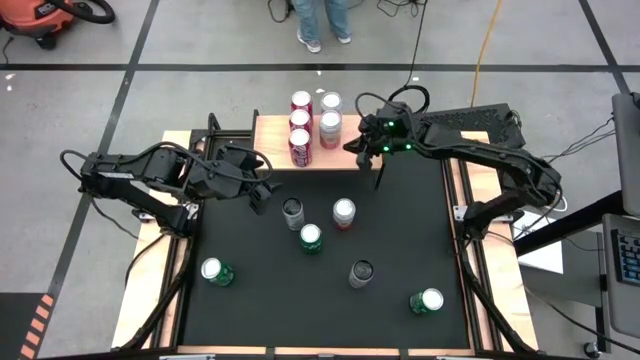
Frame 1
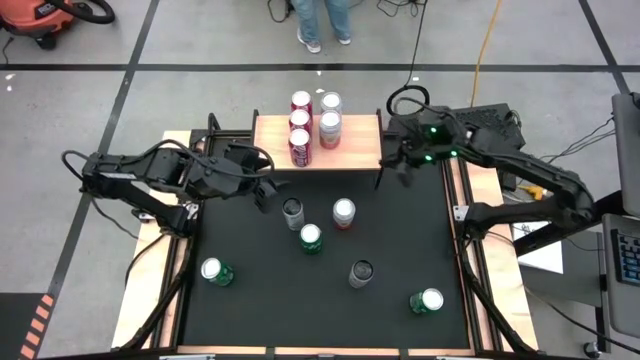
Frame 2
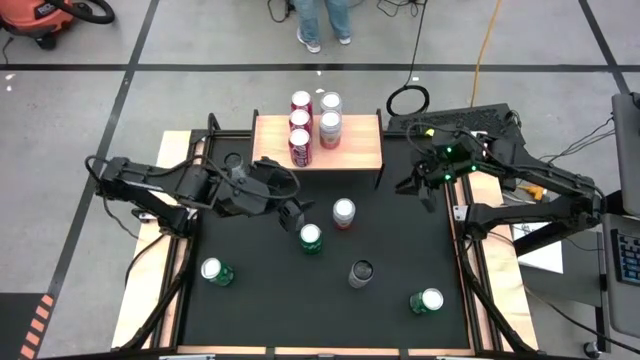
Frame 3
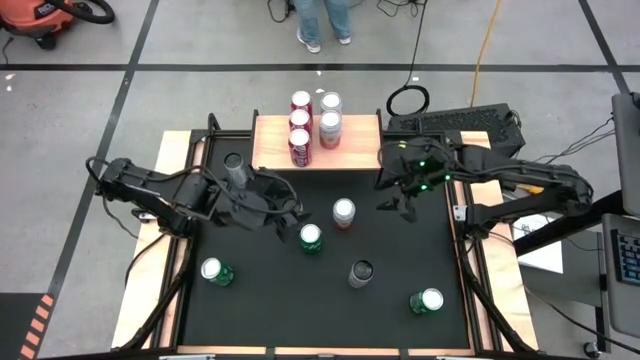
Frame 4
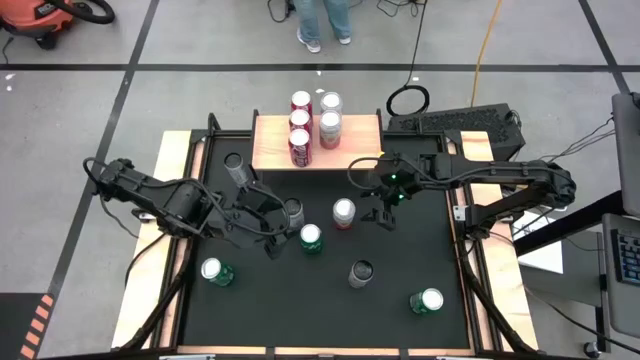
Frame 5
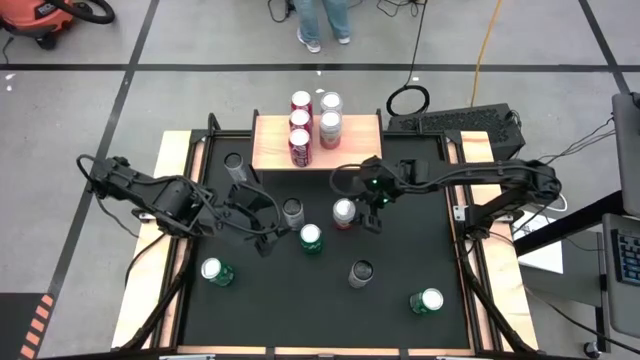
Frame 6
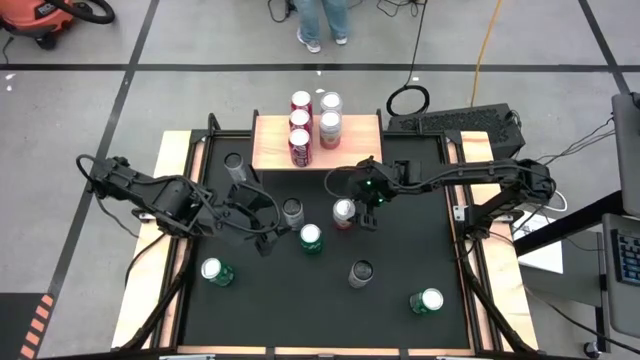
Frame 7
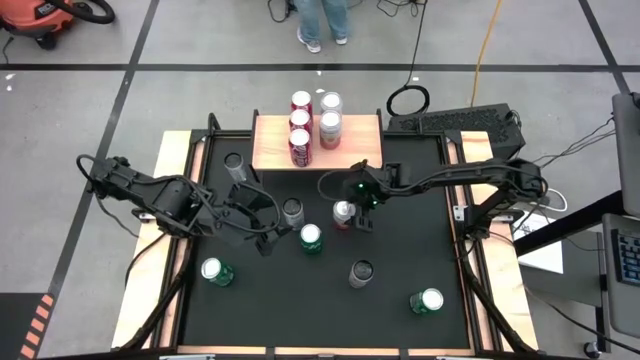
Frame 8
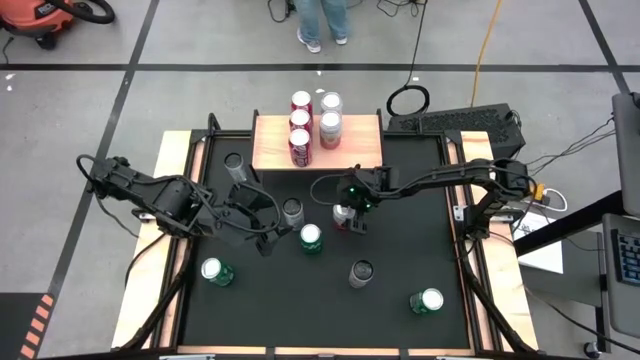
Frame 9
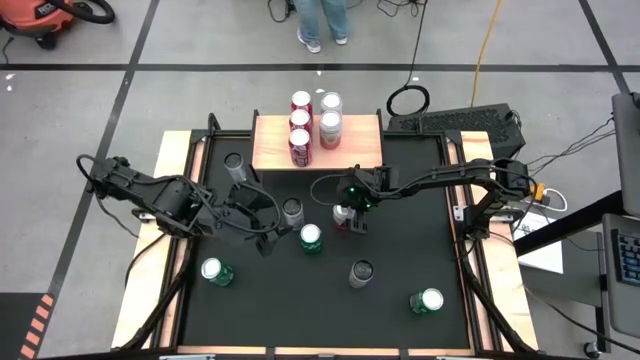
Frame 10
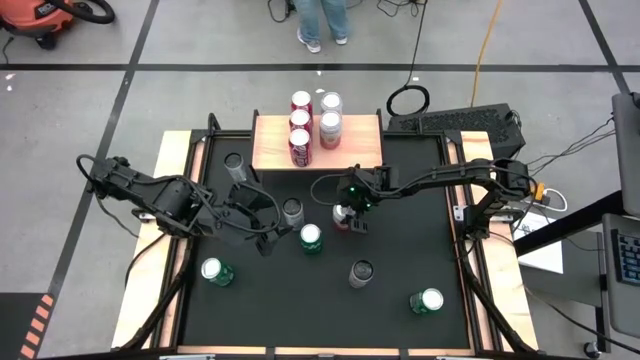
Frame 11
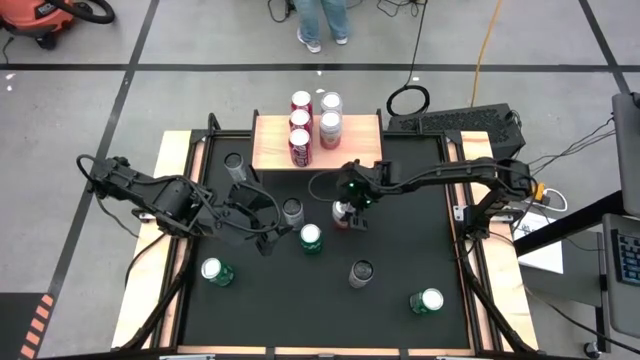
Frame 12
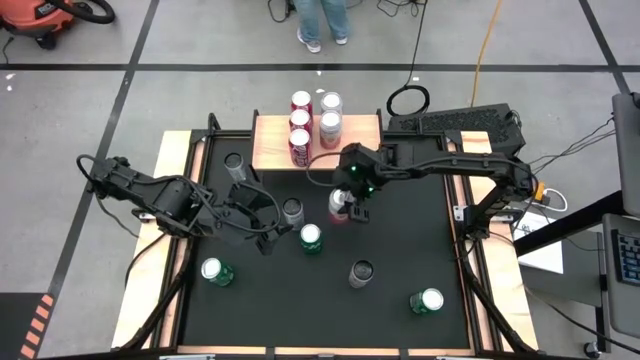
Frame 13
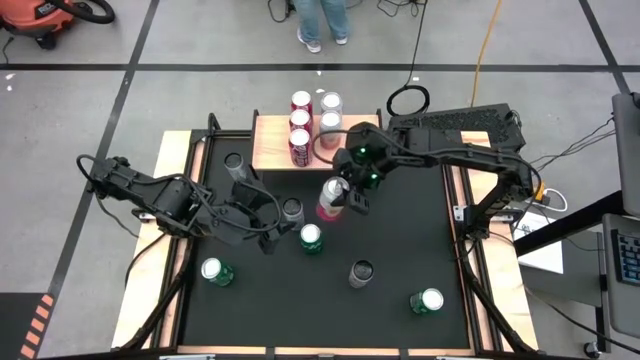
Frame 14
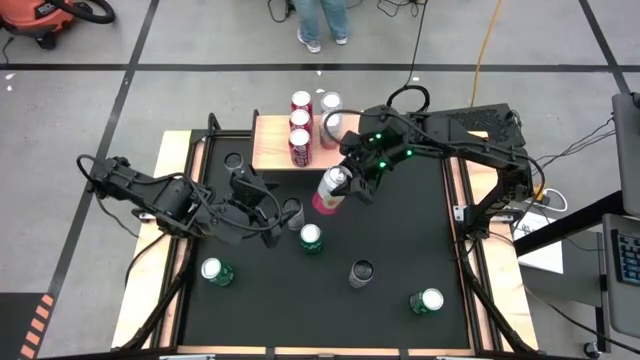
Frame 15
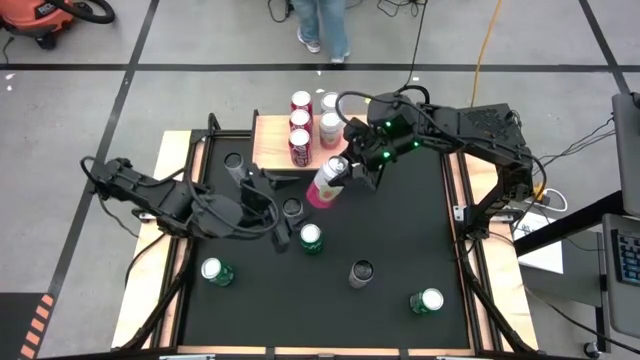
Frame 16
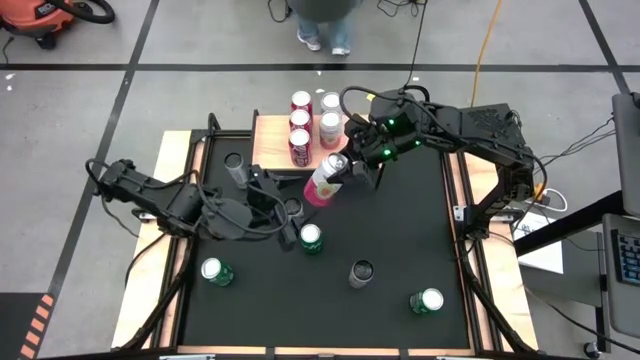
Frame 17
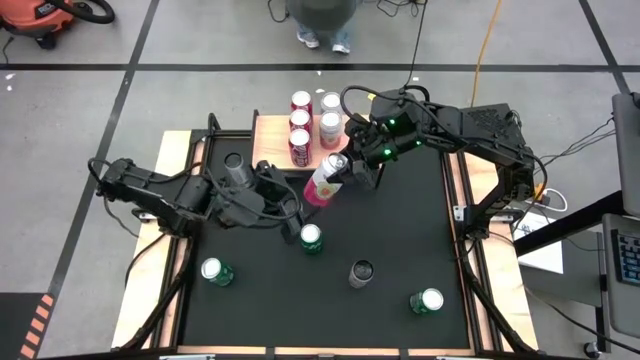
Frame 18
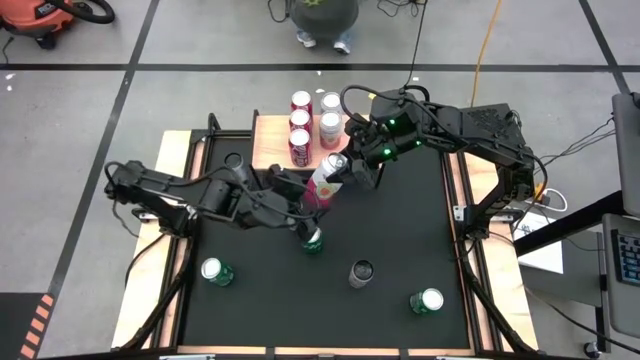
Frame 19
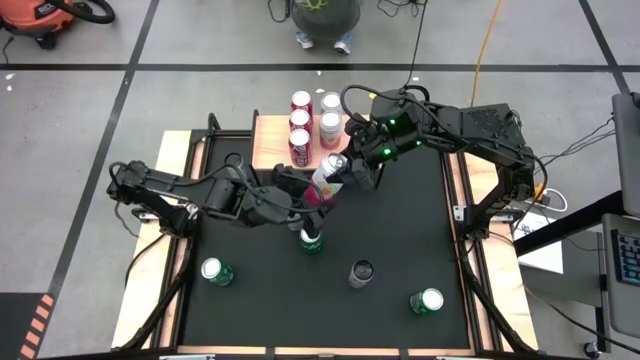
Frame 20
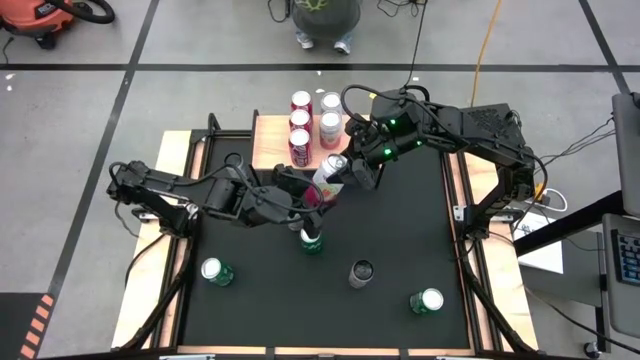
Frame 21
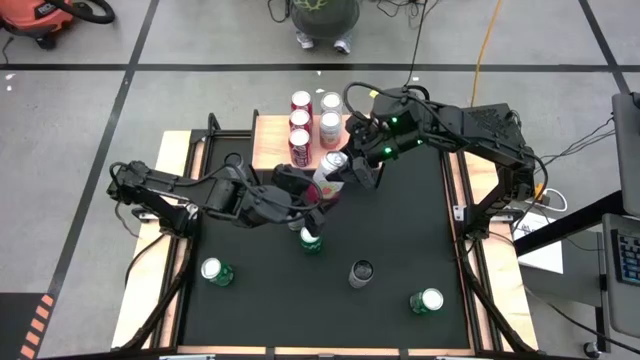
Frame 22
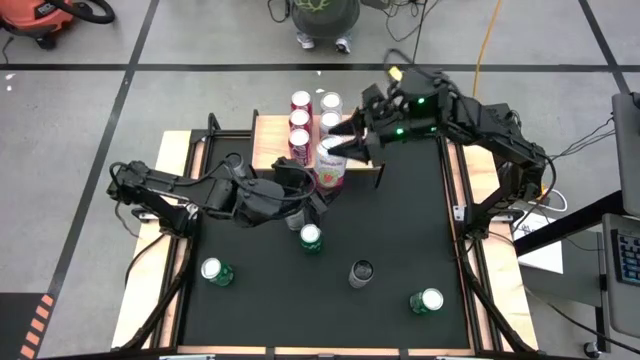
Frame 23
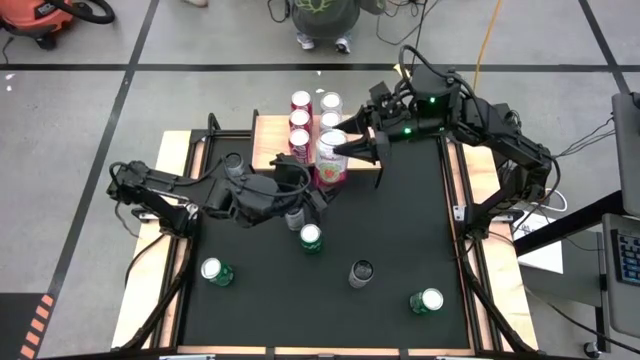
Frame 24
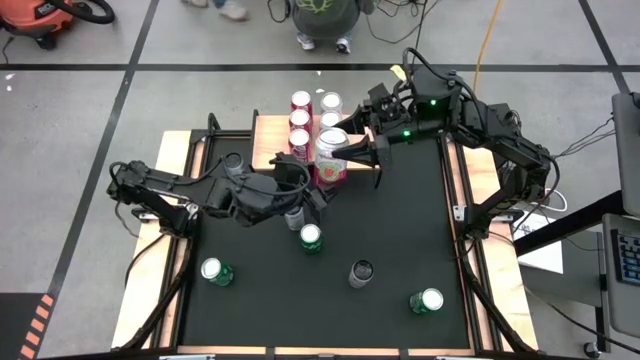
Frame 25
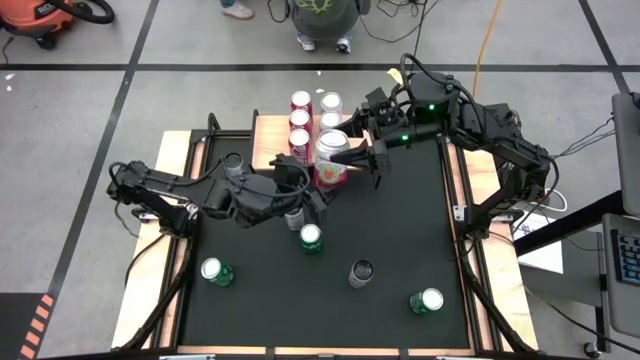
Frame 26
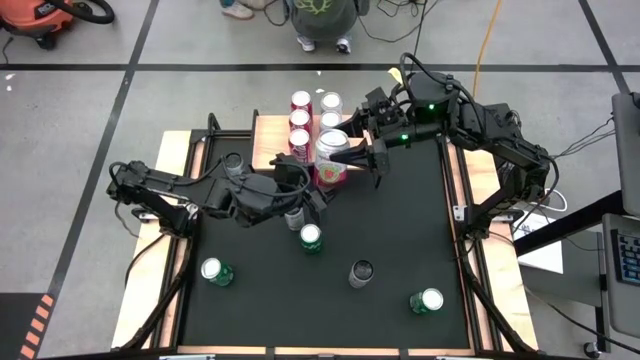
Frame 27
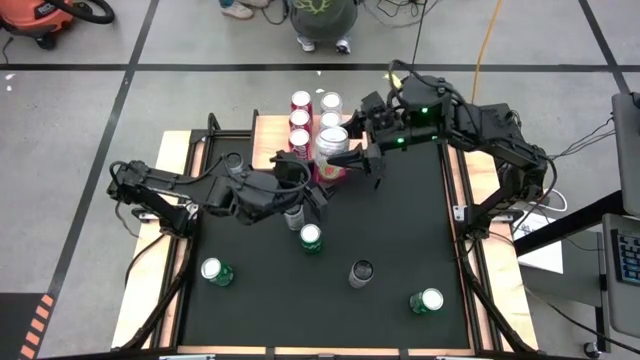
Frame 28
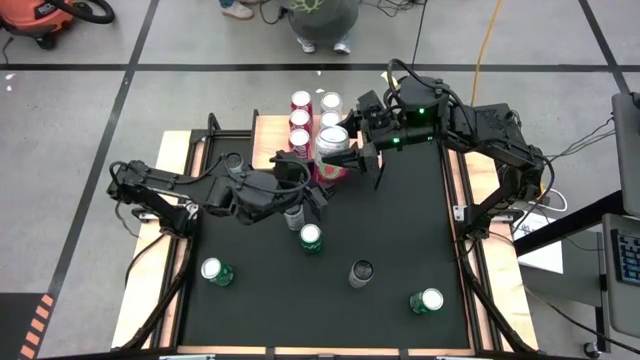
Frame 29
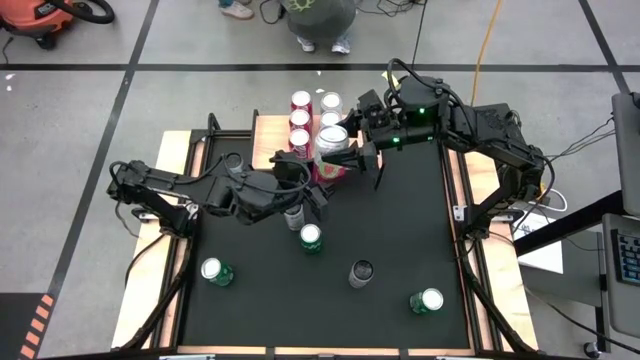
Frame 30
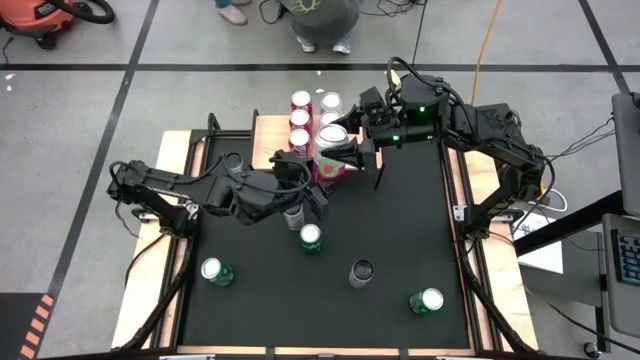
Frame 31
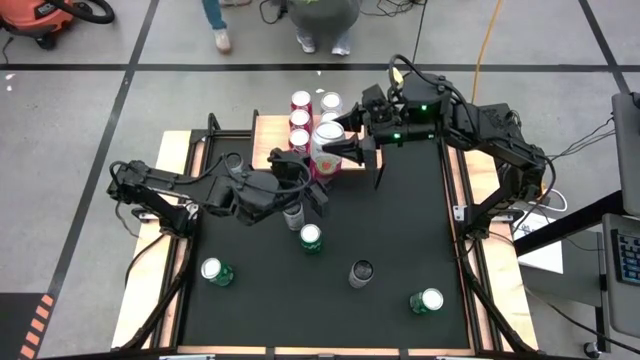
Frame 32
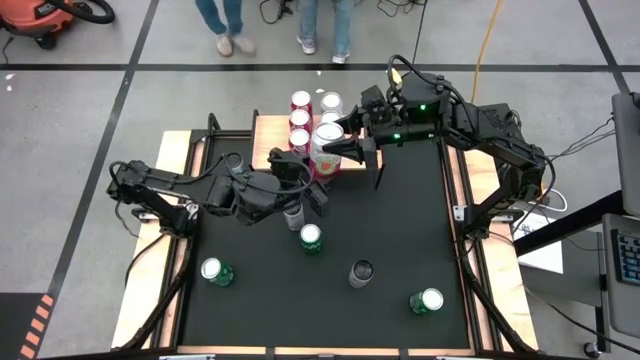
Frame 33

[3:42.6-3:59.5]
Task: Place canned beverage on shelf
Put the white pink soda can on the shelf aligned with the other white pink soda cans

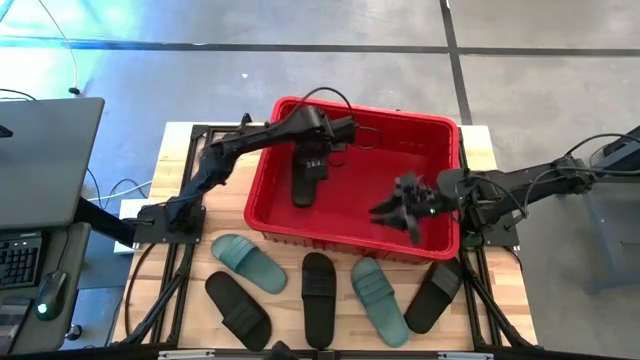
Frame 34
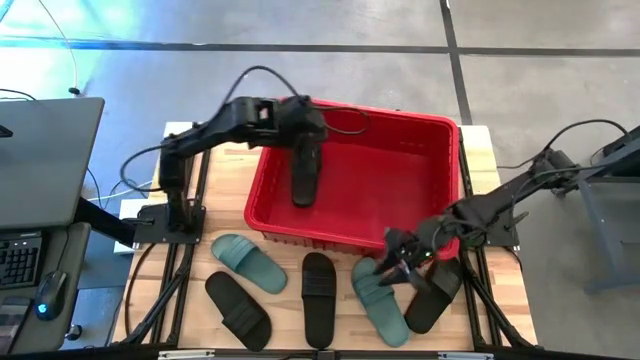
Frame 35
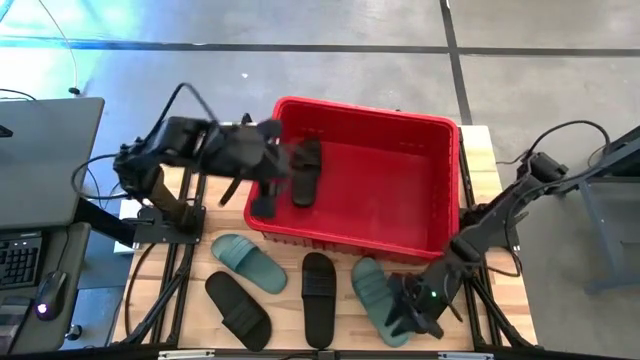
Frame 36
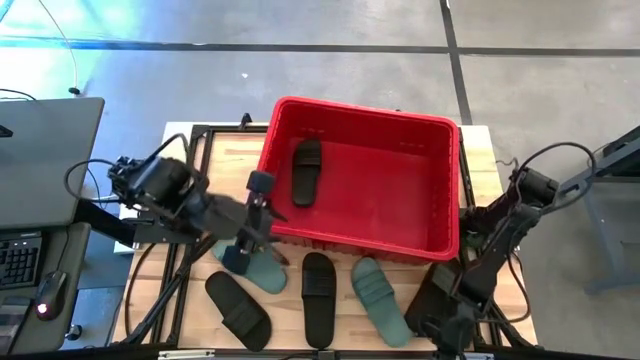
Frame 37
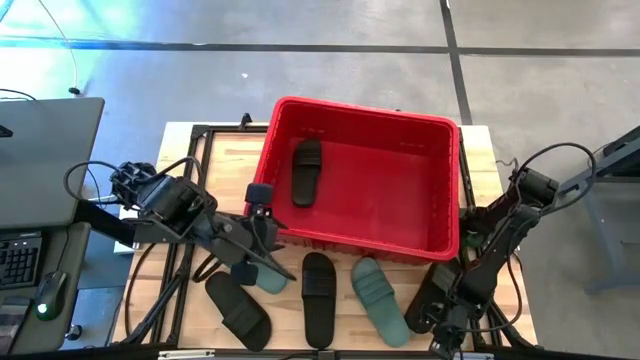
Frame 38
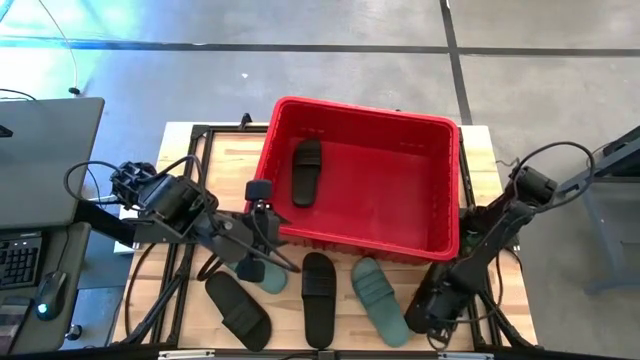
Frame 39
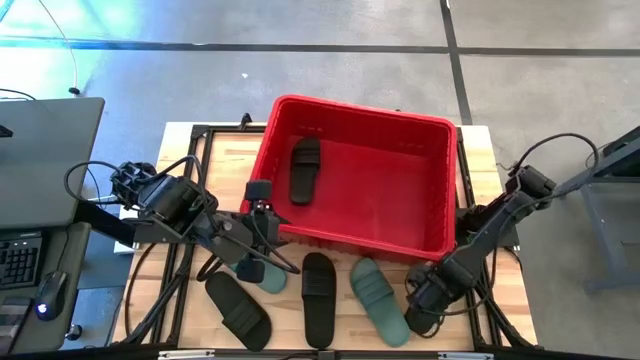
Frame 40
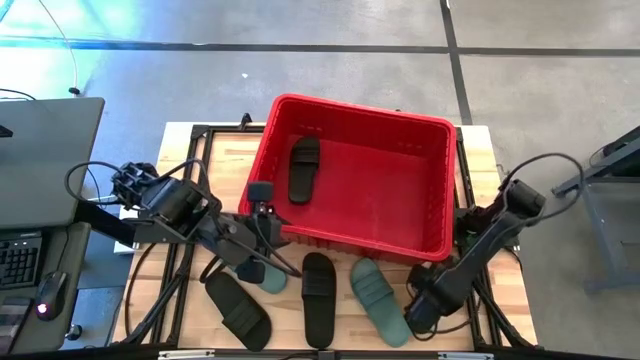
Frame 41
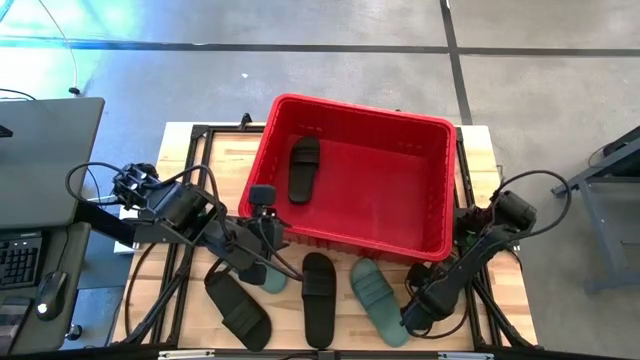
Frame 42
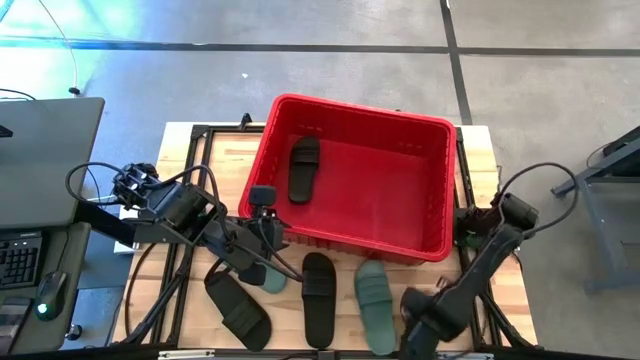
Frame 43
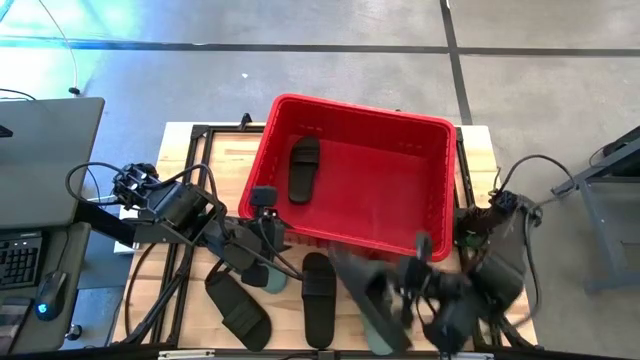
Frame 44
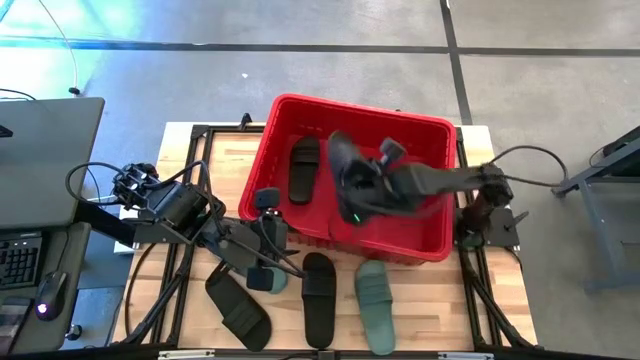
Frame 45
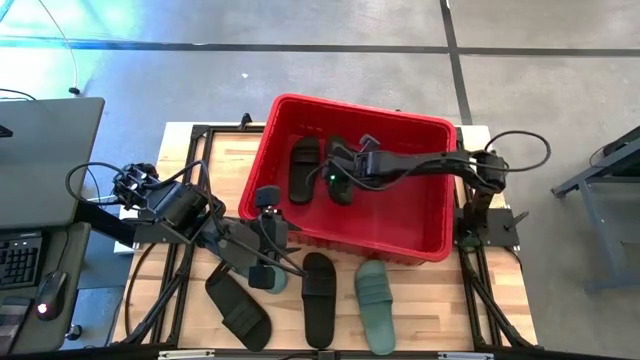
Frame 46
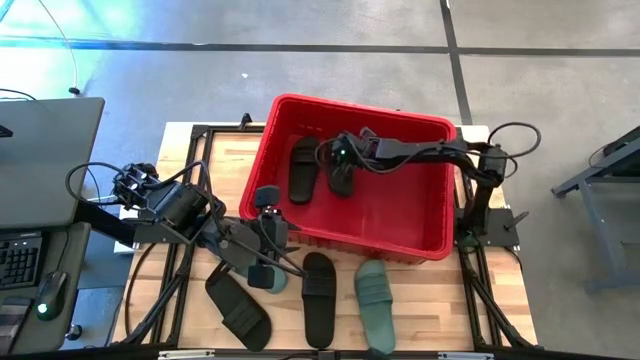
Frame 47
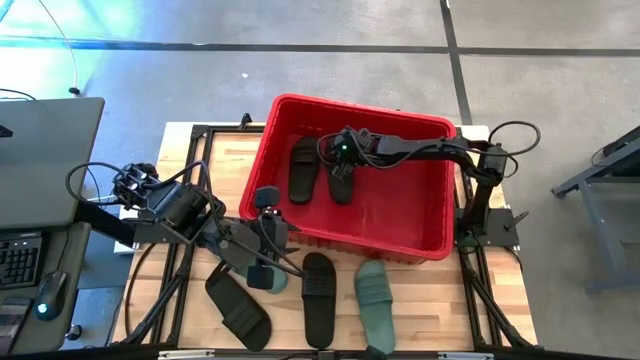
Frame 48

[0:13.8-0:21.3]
Task: Pick and place slides into bin
Put the black slide into the red bin
